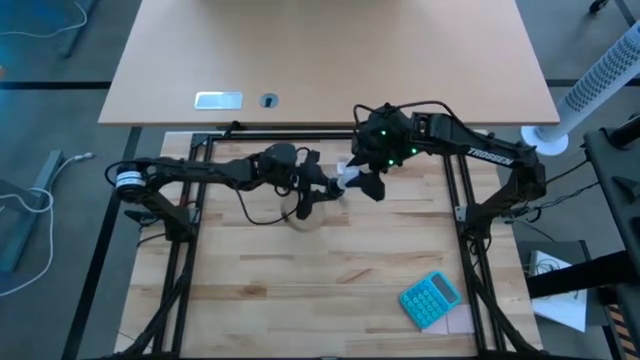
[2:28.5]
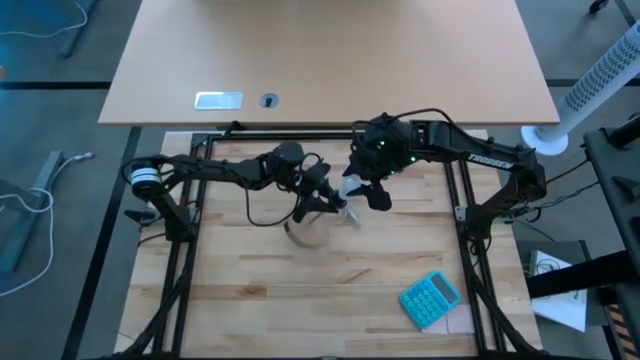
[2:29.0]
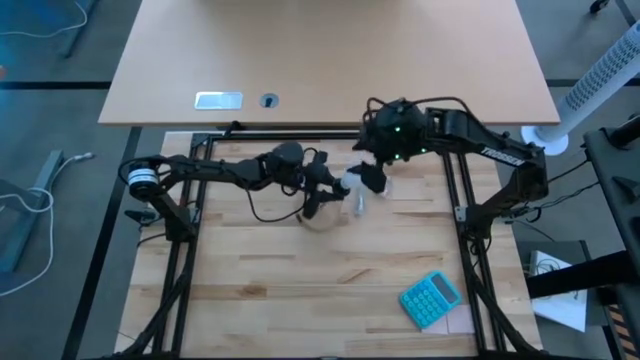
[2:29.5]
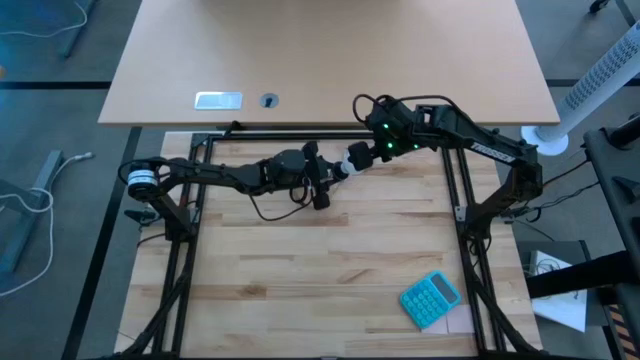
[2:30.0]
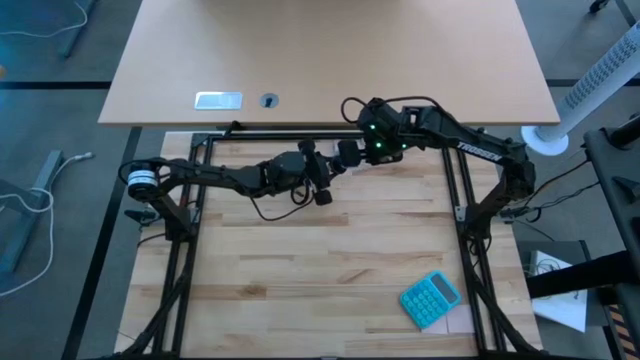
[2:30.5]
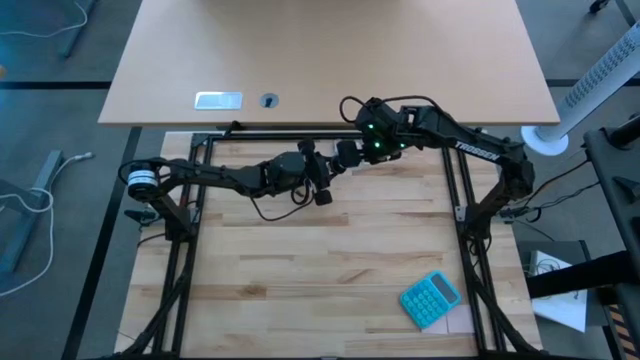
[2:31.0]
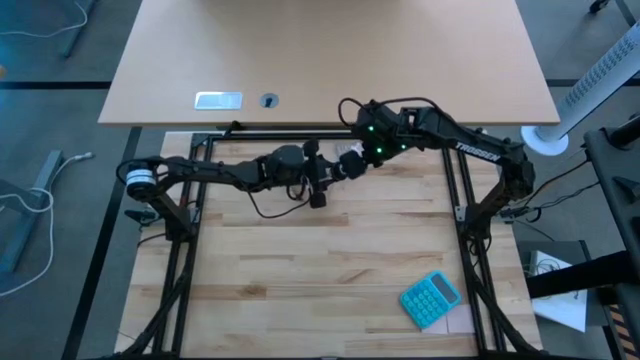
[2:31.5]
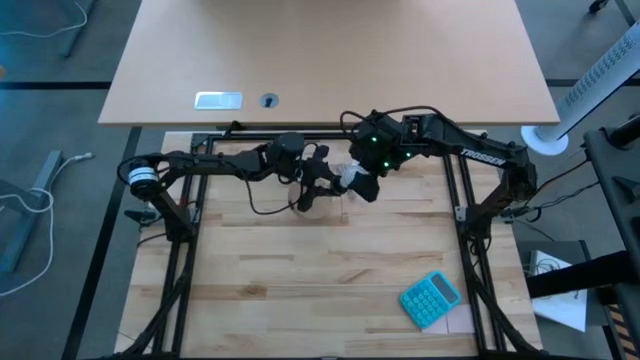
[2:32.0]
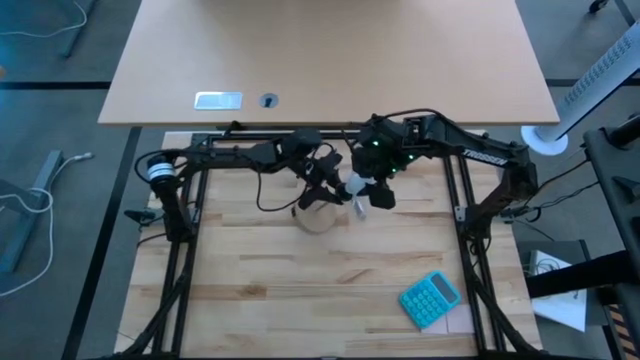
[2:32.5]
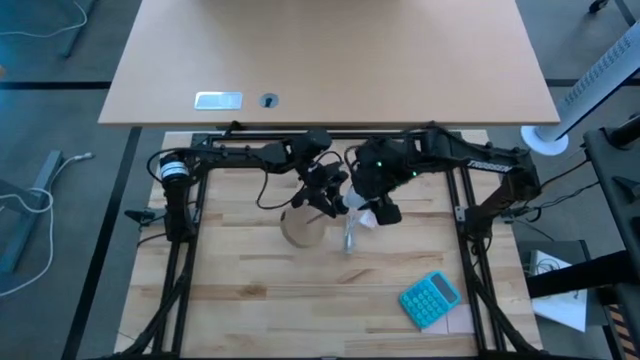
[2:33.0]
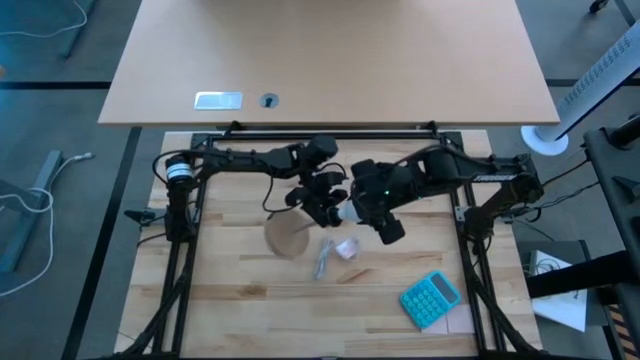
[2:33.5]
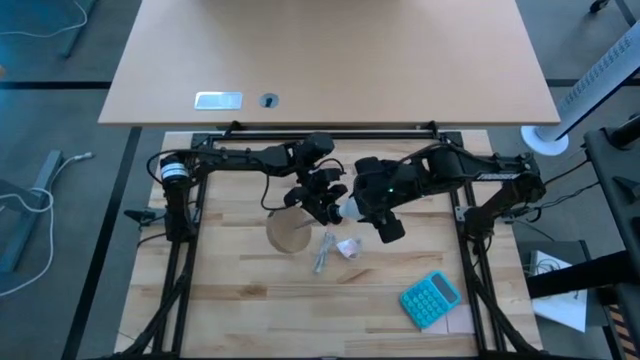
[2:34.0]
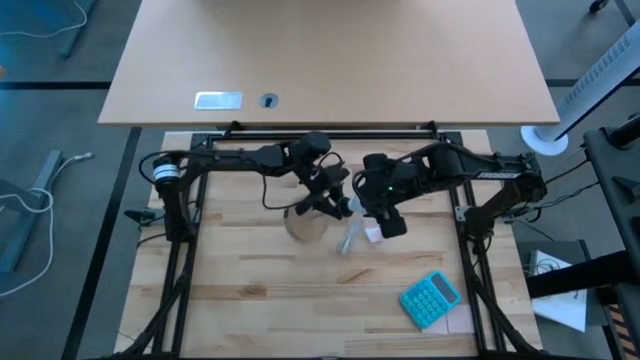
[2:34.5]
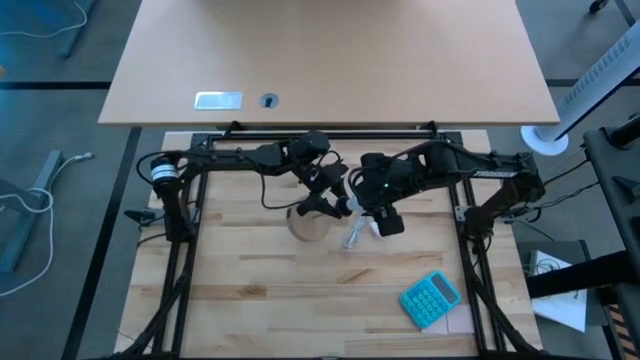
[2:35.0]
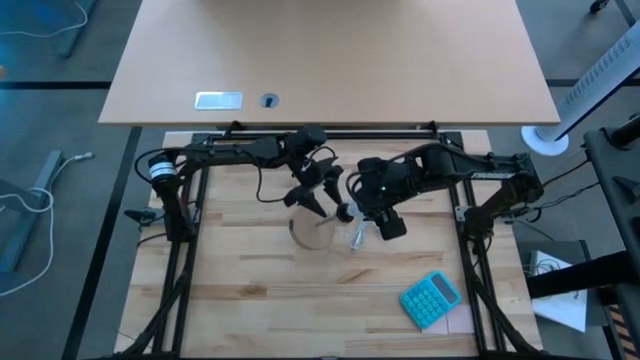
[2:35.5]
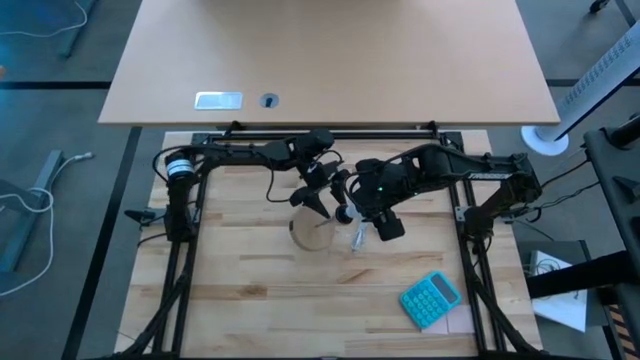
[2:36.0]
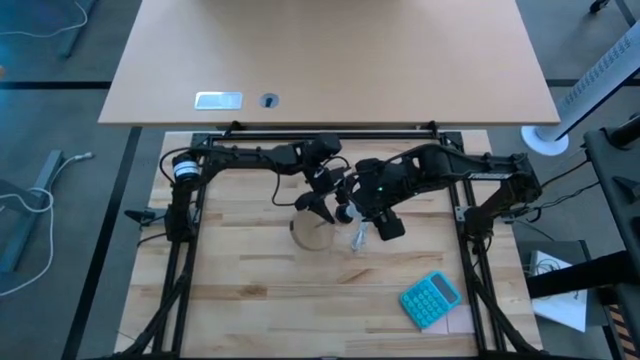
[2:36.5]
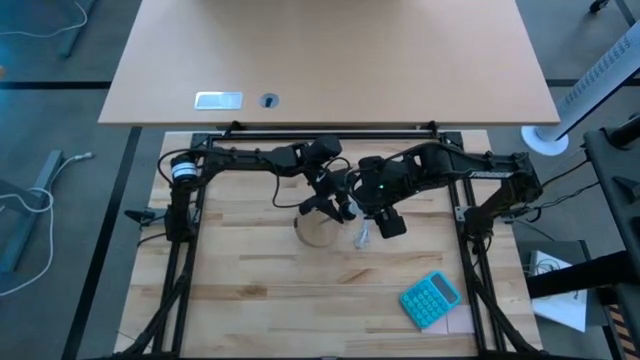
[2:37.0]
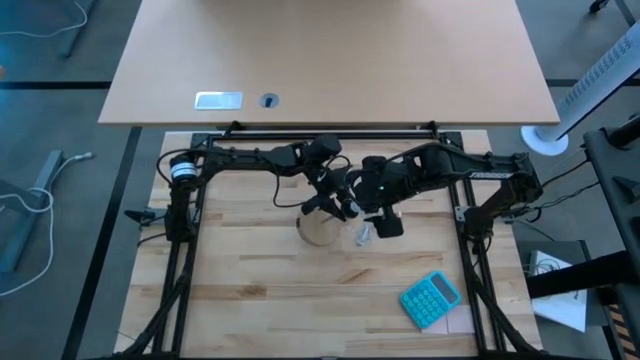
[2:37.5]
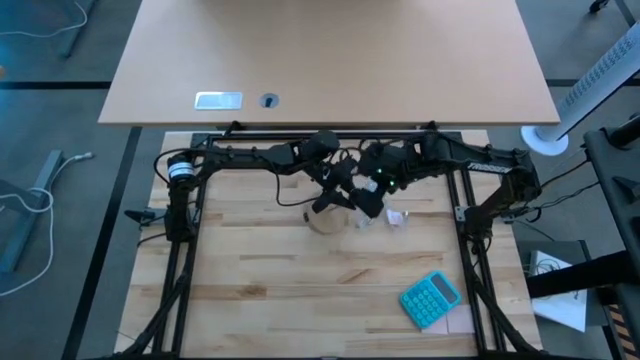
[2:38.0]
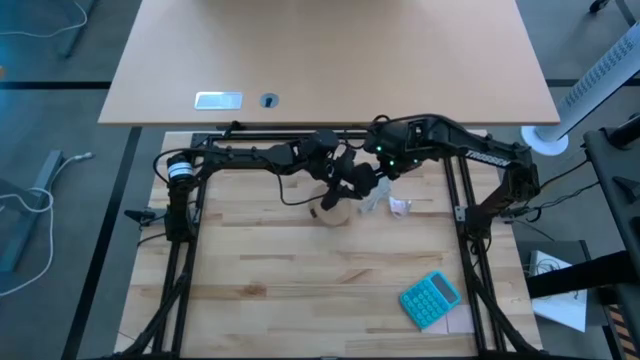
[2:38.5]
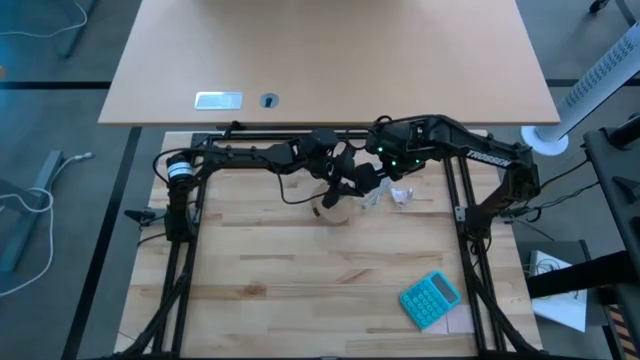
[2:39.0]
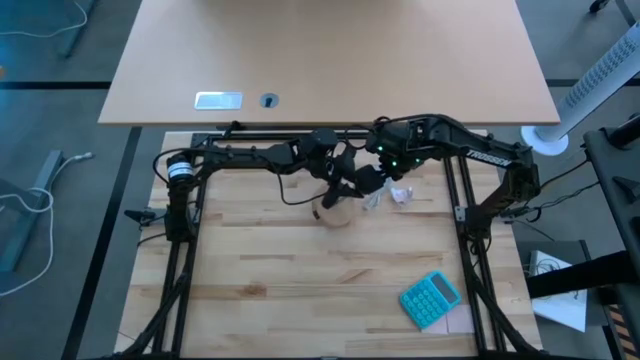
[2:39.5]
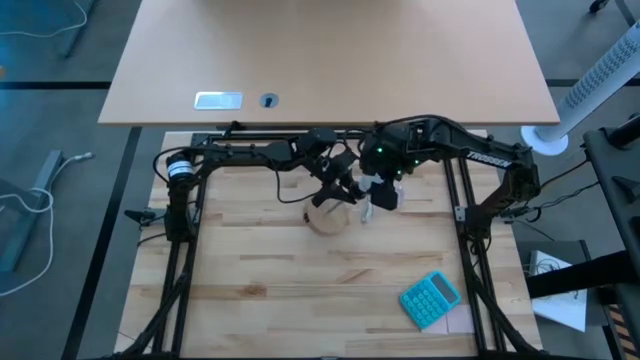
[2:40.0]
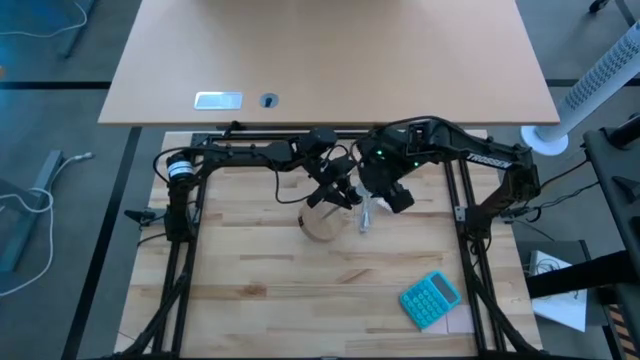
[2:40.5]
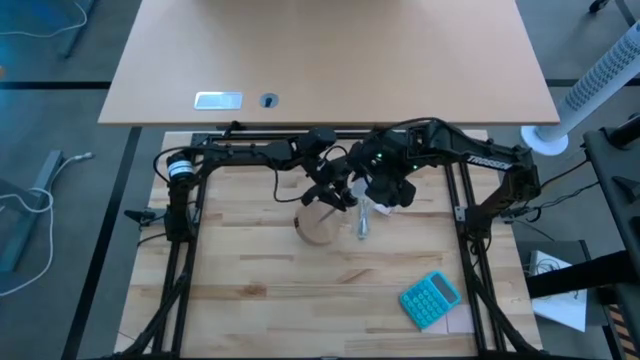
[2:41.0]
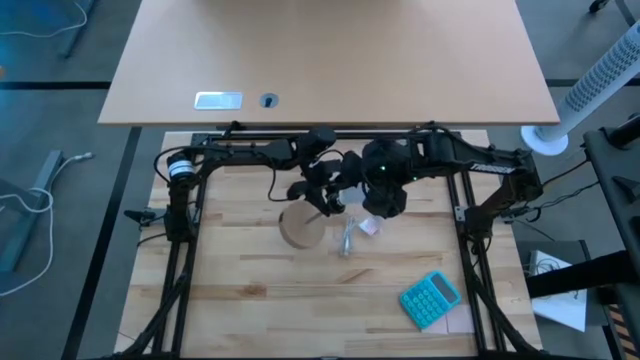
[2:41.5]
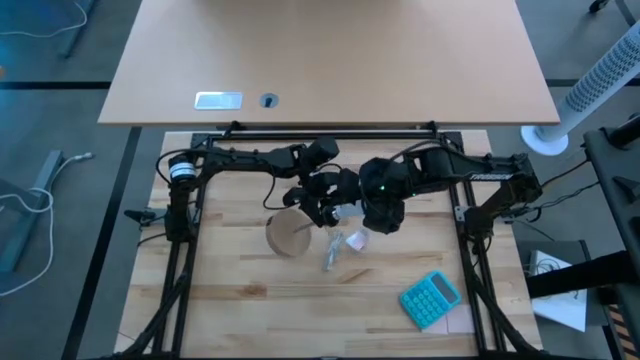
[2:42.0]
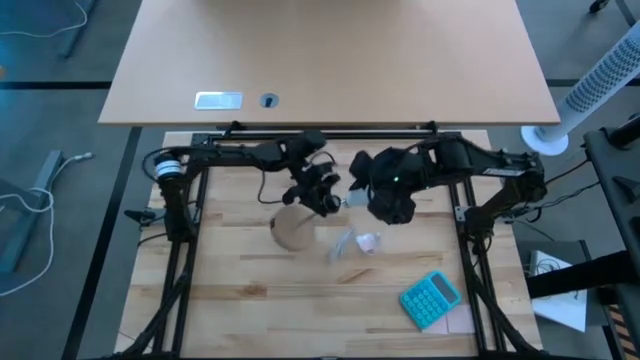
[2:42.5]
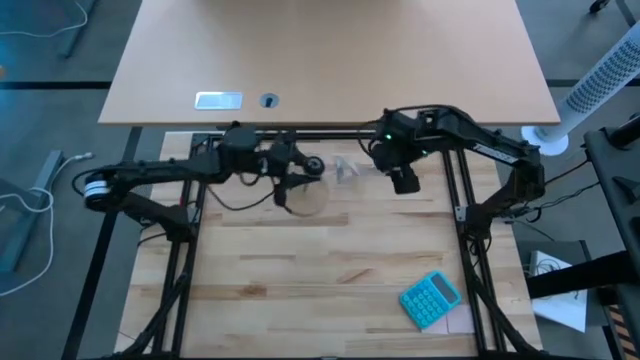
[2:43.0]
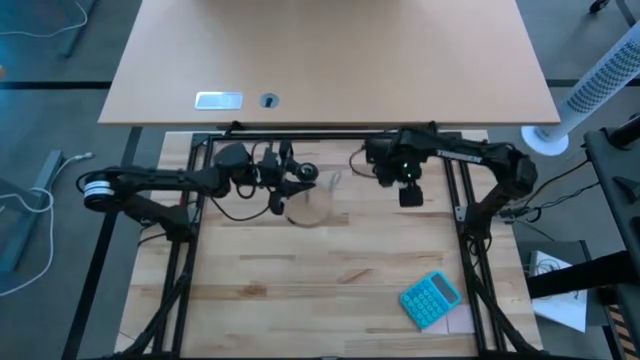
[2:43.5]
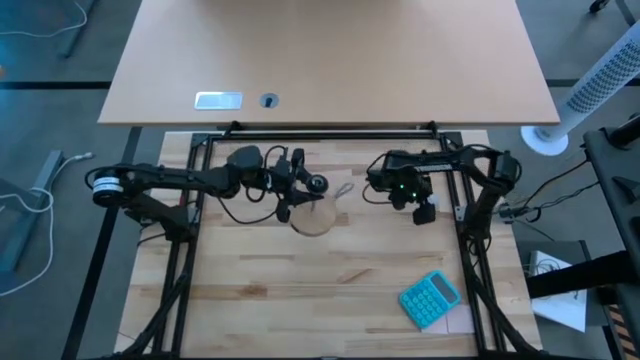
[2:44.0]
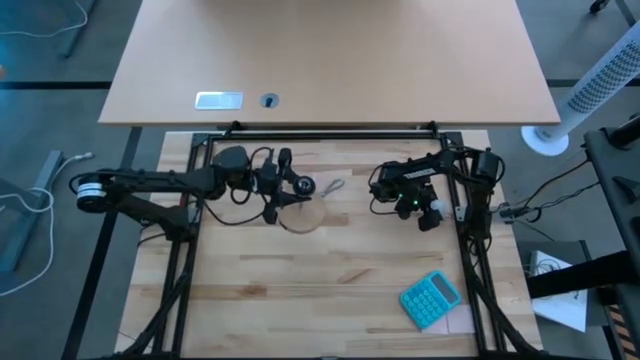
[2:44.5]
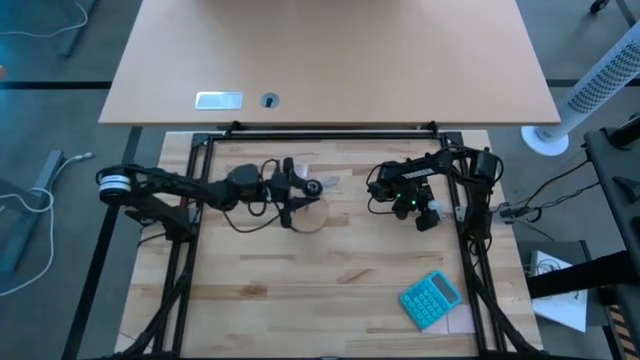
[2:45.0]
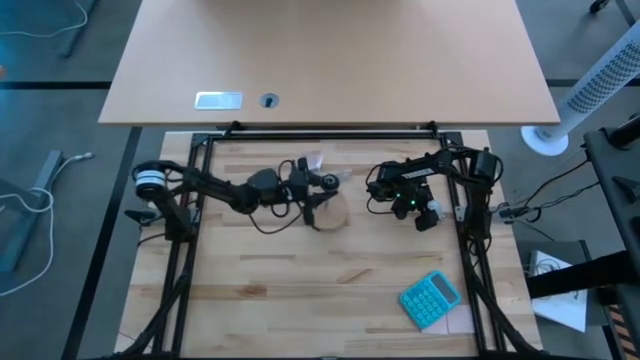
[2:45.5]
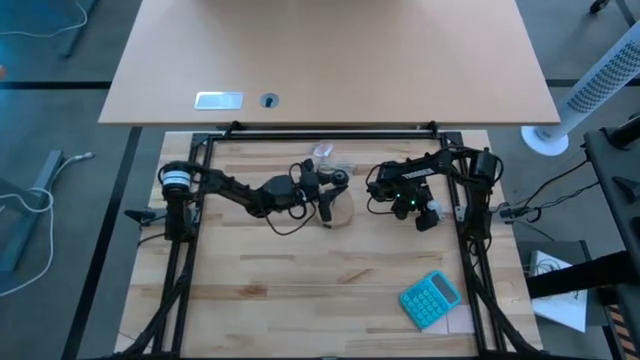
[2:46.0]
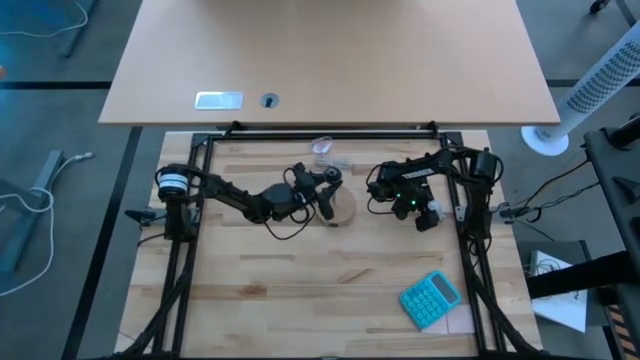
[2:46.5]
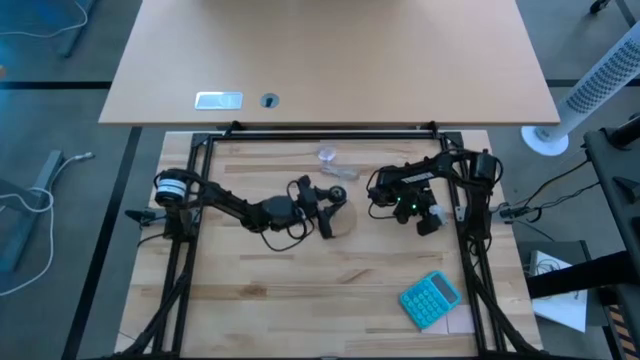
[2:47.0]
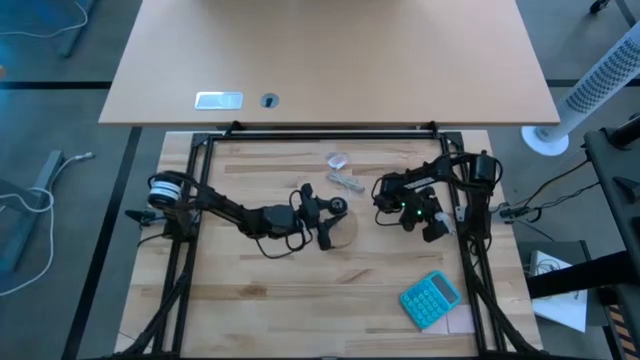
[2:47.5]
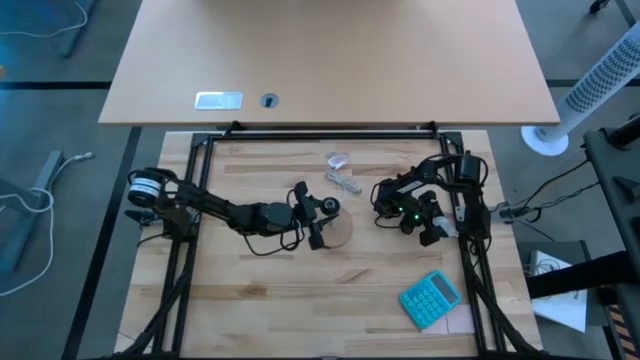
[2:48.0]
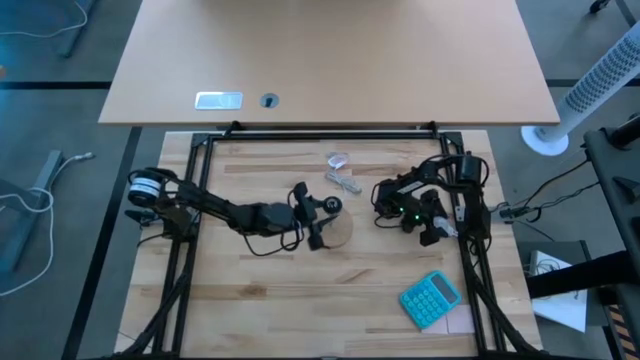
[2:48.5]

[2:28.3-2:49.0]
Task: Screw lightbulb
Remove the lightbulb from the lamp
